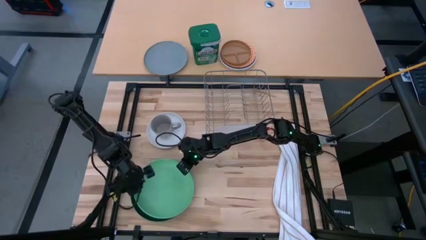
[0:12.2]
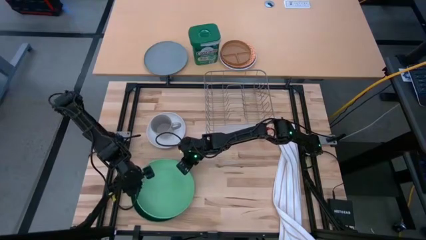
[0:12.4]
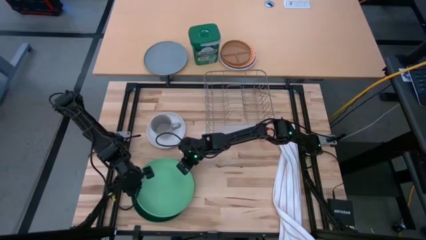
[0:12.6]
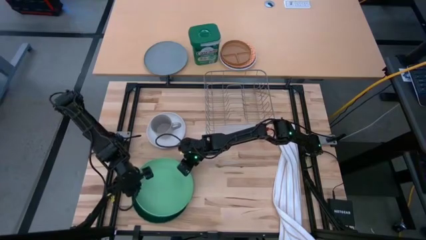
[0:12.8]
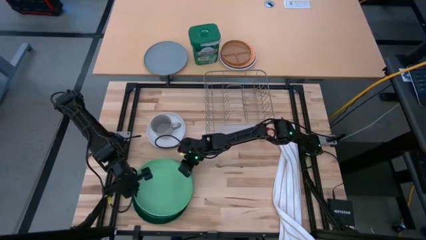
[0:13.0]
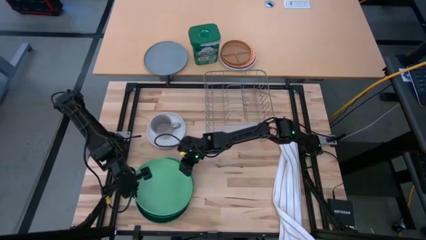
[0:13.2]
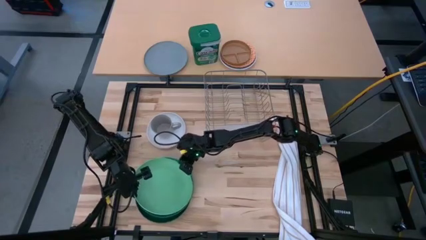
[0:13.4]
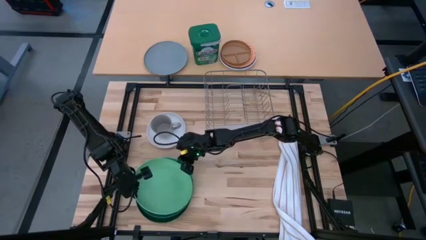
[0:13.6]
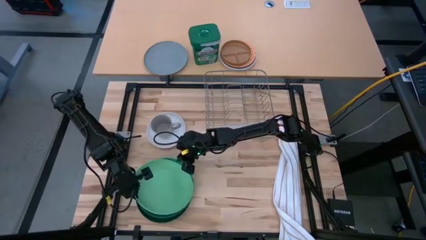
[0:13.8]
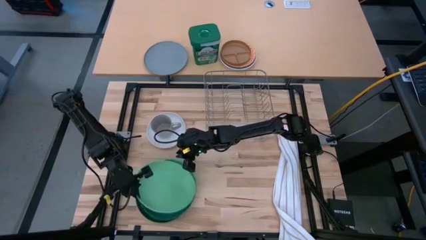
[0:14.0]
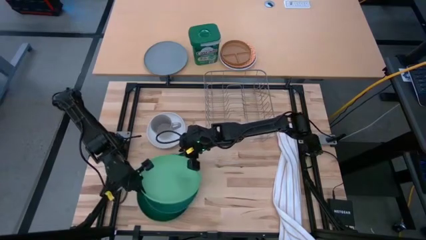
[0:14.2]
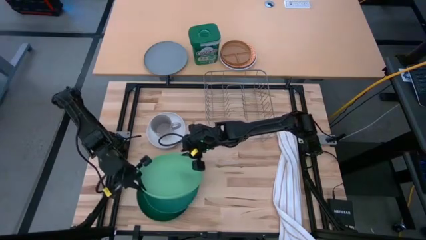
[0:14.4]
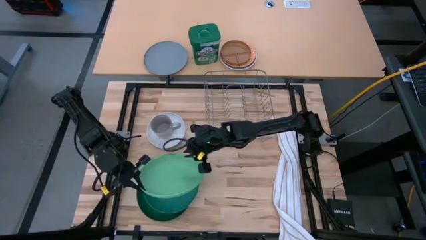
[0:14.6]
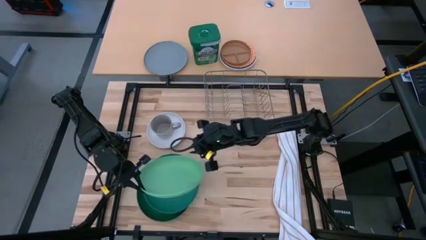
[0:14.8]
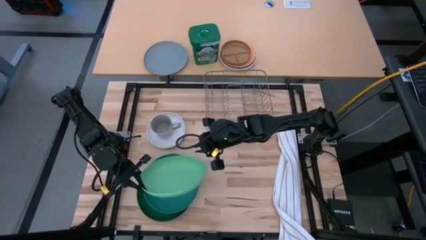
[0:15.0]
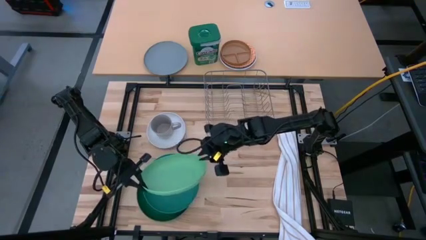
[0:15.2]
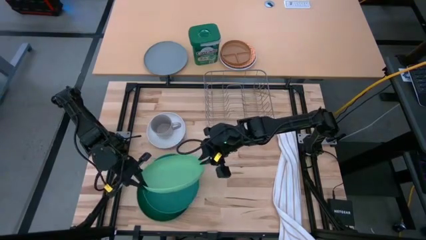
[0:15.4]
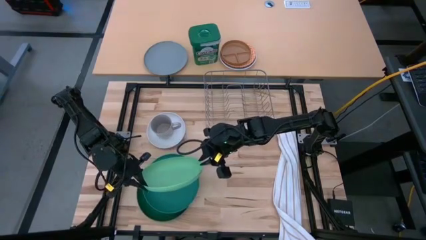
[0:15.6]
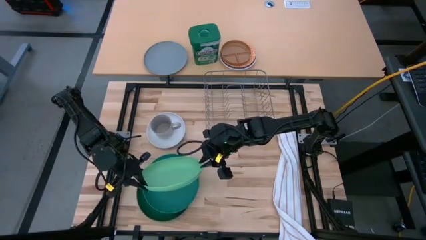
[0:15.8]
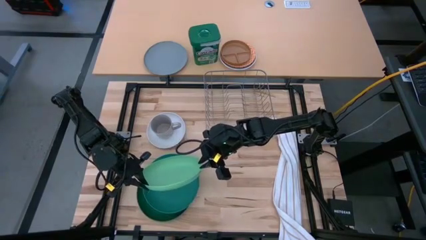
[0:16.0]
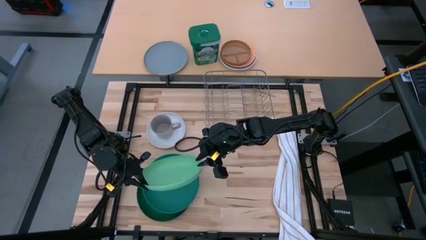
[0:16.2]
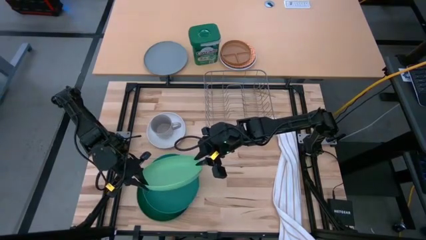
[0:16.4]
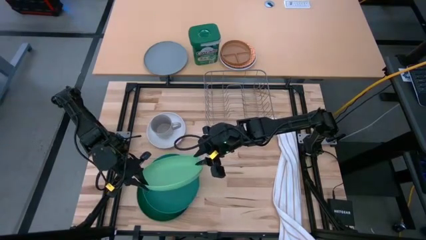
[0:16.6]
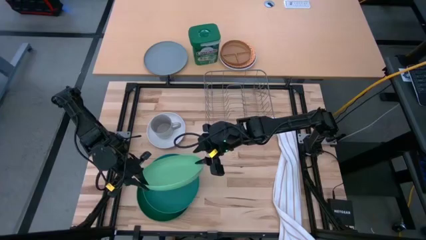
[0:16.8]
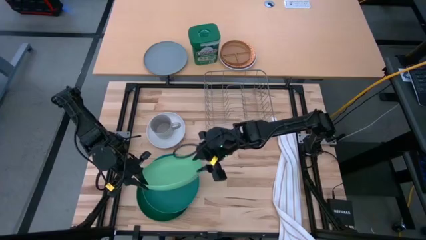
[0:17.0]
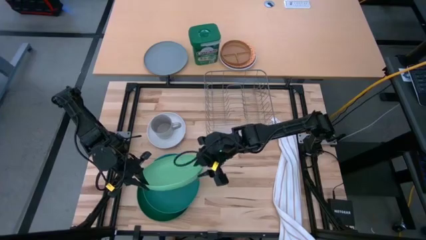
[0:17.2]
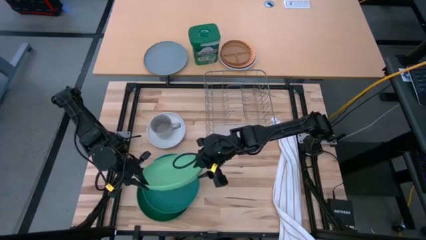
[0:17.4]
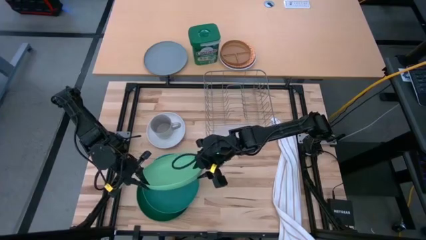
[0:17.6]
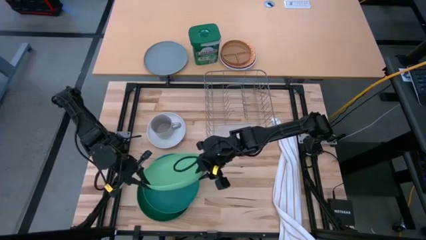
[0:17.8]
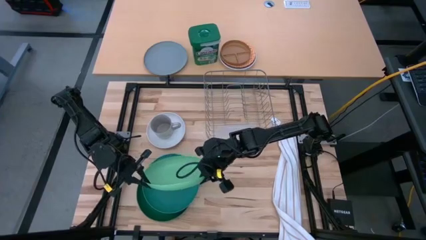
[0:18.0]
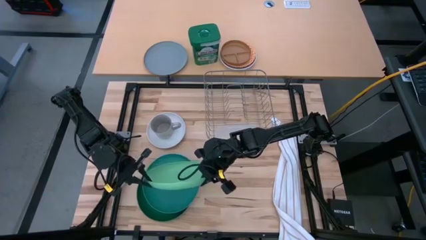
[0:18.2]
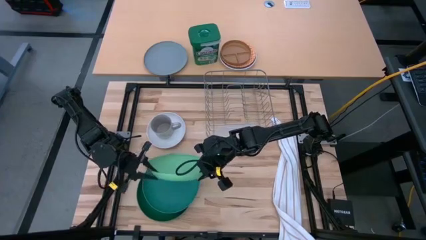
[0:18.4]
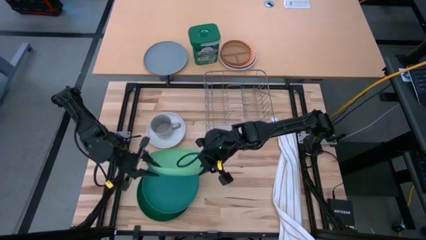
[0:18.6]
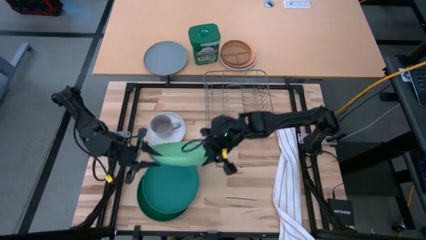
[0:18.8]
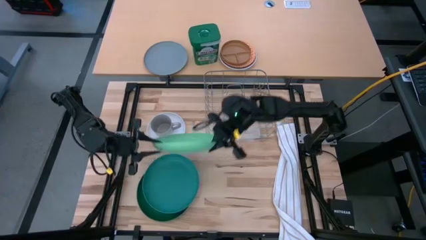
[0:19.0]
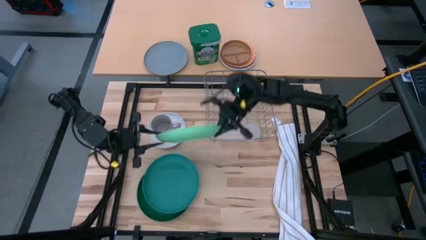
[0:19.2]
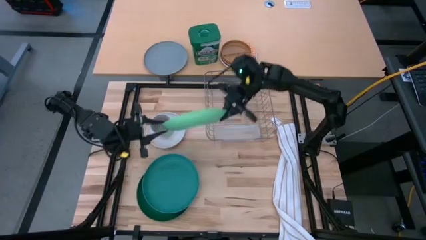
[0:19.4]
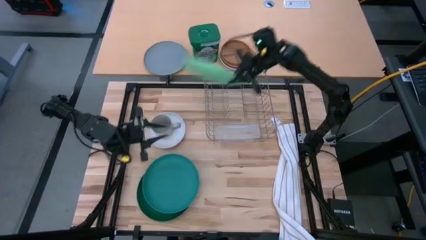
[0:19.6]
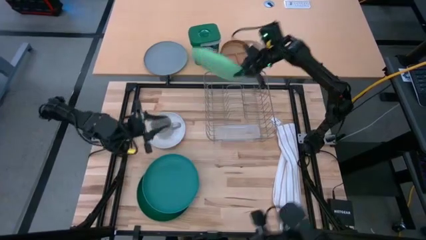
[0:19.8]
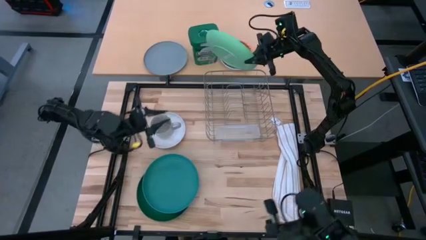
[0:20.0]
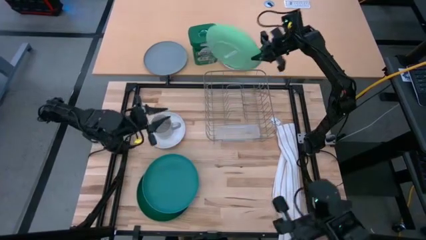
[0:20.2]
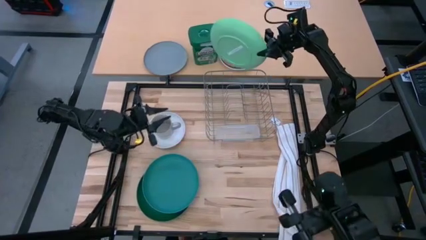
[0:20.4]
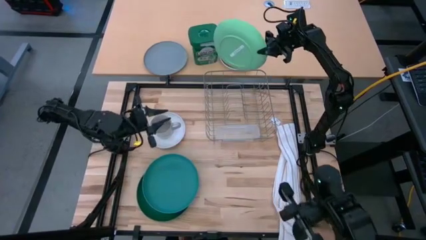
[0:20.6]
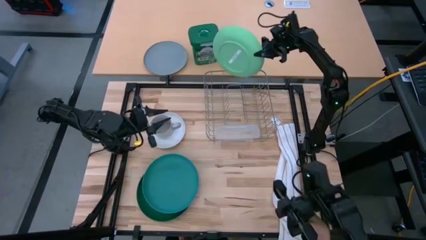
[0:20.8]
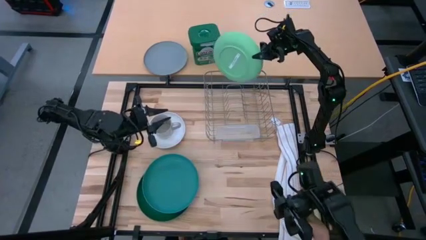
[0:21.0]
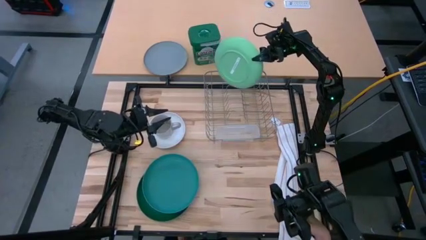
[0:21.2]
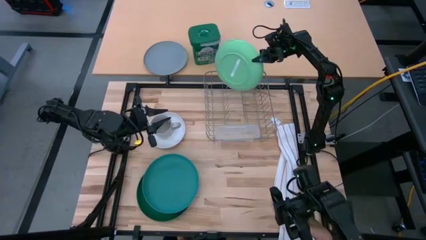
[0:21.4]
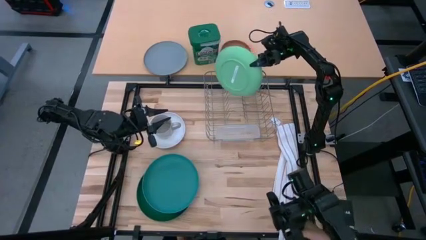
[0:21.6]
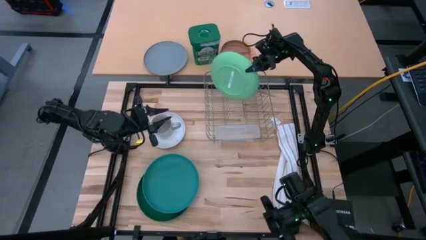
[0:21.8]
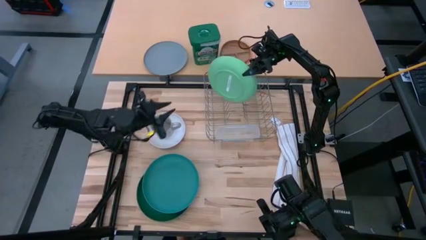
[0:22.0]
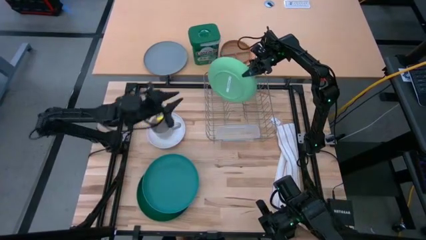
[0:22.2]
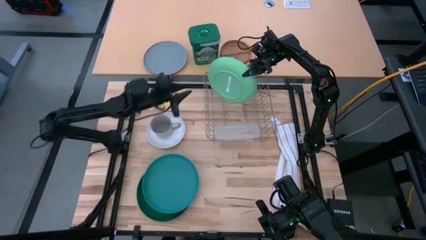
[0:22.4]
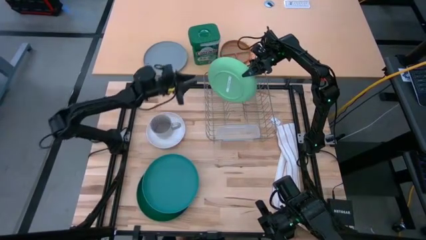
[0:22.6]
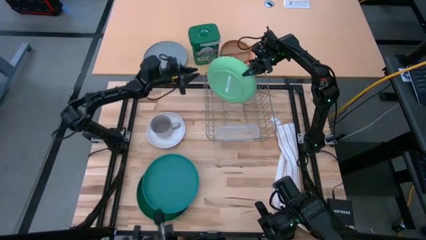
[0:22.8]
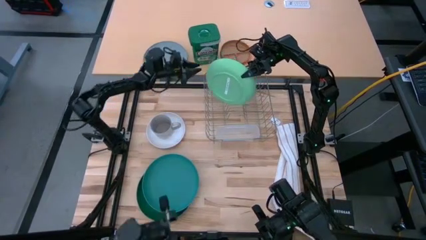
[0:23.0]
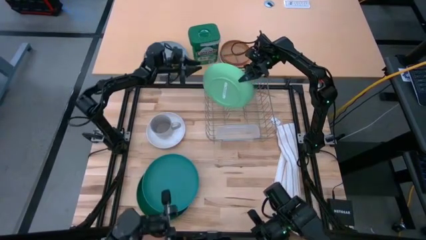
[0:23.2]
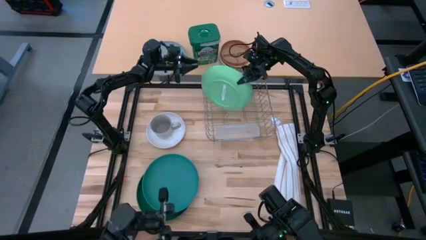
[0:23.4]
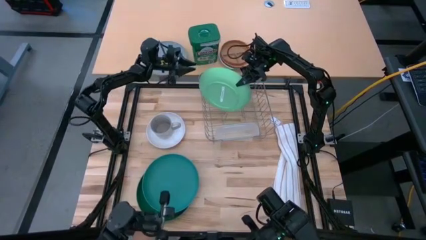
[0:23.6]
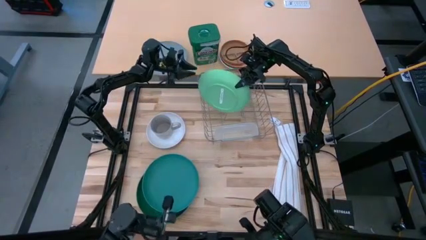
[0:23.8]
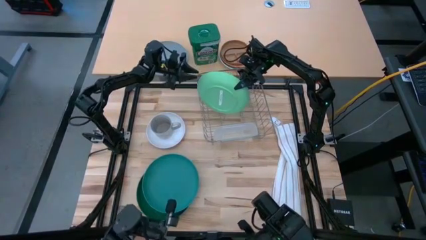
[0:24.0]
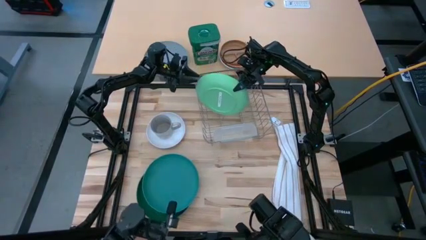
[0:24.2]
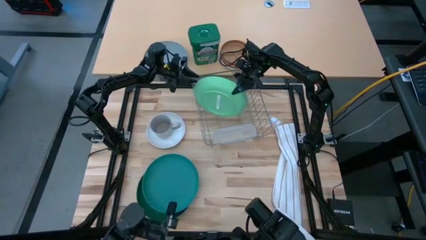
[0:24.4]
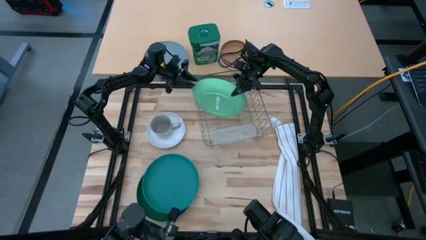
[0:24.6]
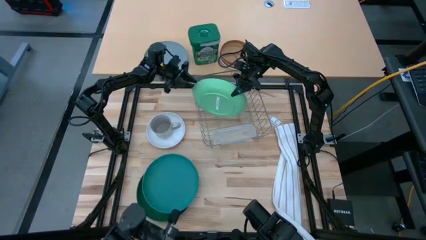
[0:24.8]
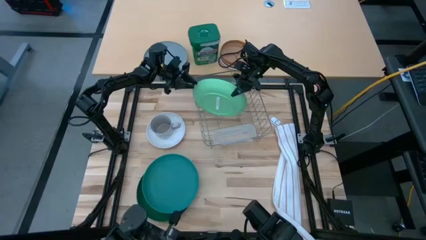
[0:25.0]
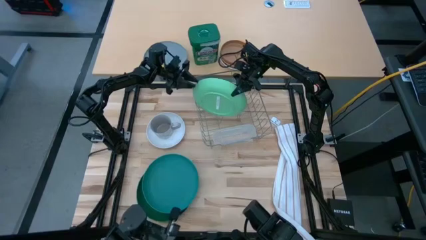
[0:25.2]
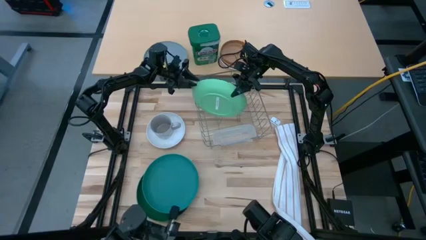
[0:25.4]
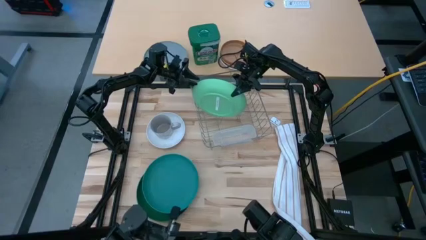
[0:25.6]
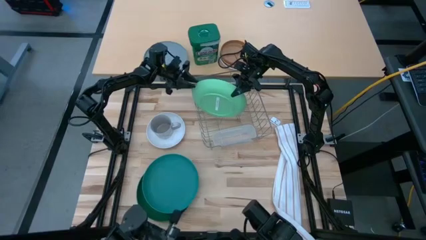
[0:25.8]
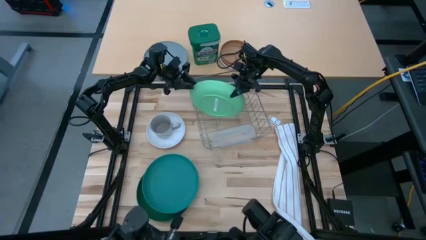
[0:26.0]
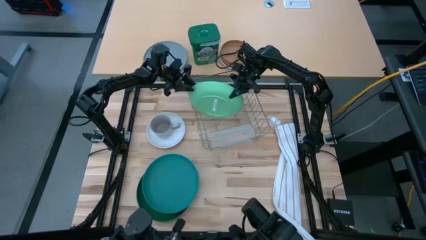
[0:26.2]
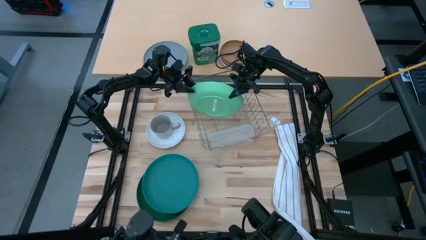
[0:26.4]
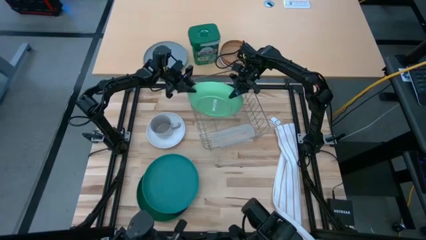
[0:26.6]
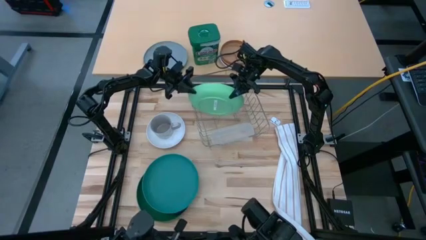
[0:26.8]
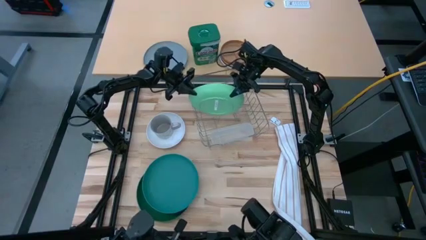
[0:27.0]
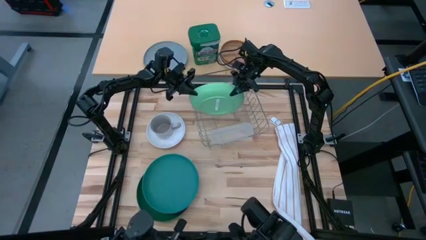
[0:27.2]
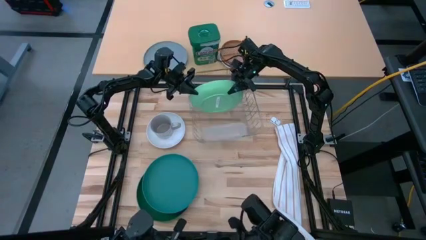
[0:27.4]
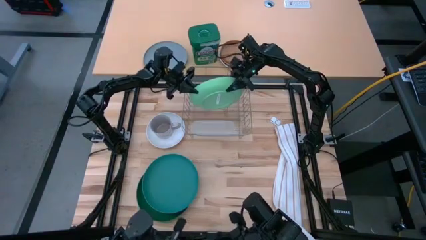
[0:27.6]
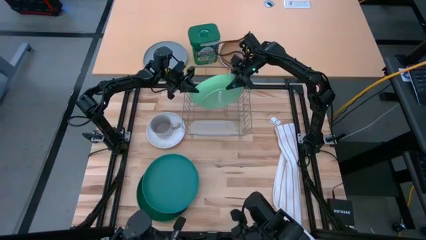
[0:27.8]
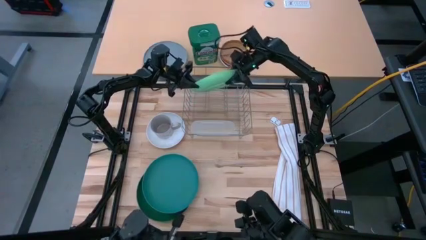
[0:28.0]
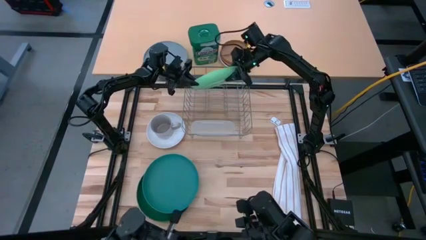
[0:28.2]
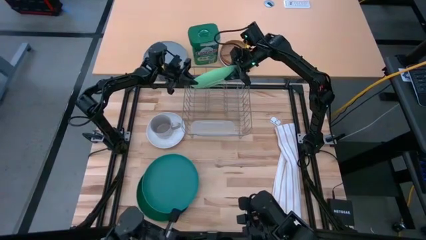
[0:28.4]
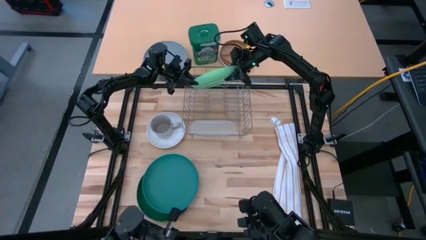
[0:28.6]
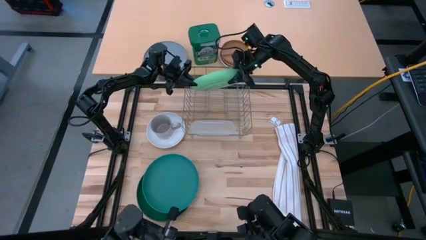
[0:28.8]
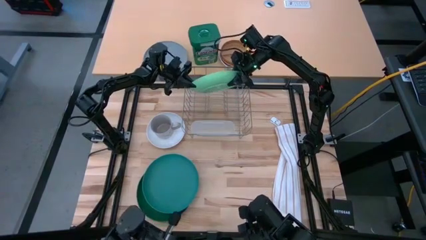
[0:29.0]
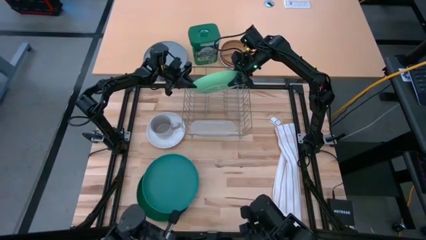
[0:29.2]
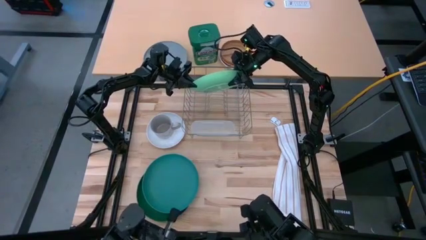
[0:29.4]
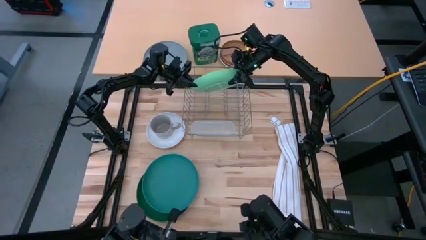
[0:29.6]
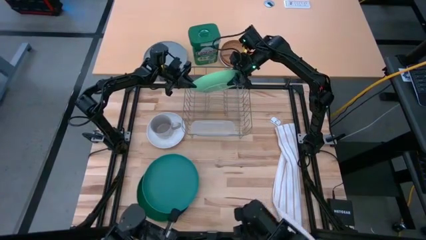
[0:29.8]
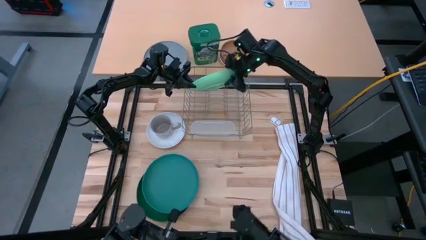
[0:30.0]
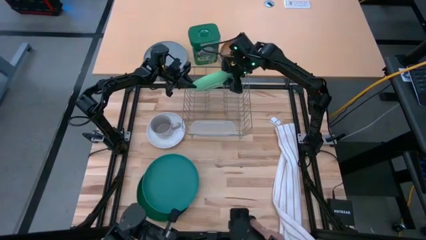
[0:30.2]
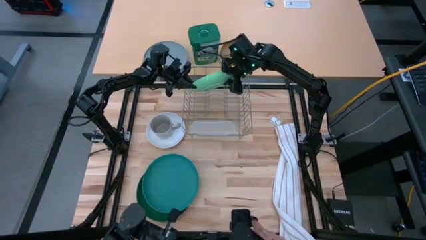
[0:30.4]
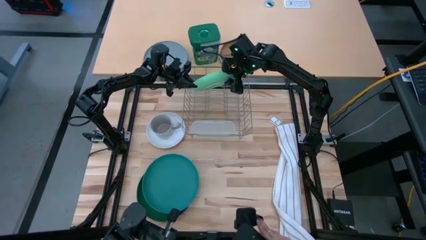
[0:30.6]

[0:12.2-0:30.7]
Task: Sort dishes
Put the light green plate into the dish rack
